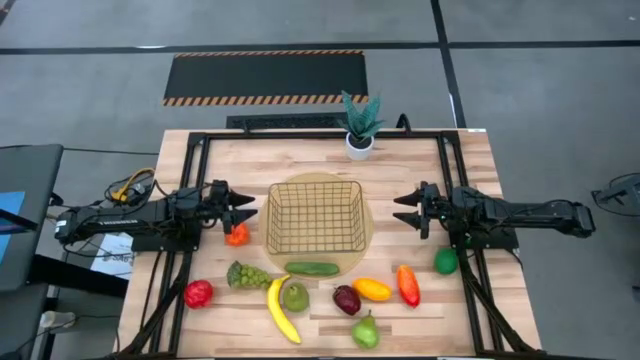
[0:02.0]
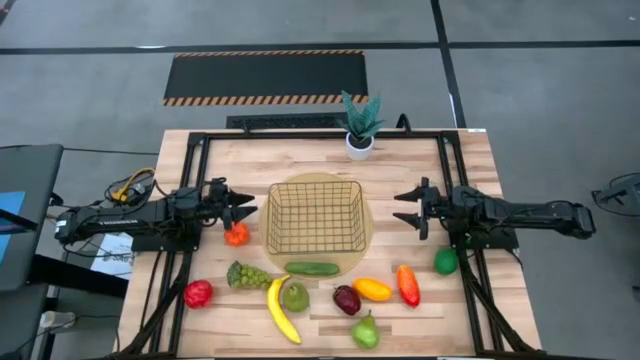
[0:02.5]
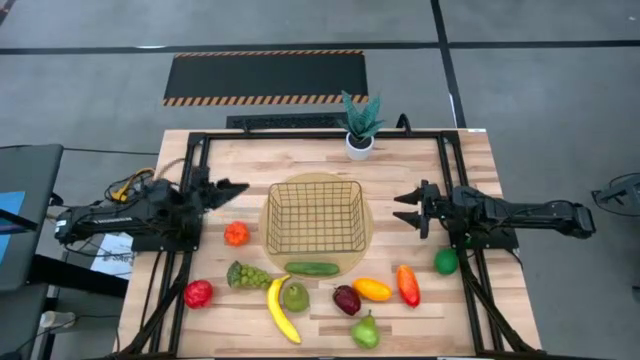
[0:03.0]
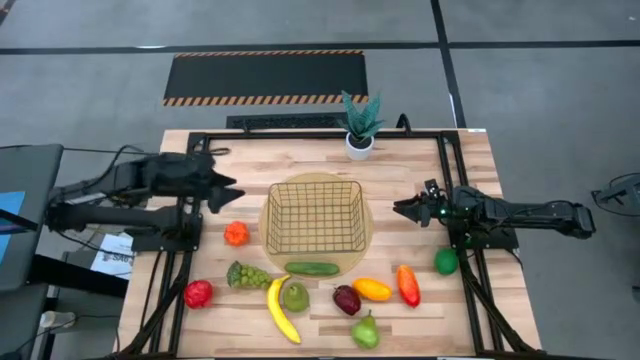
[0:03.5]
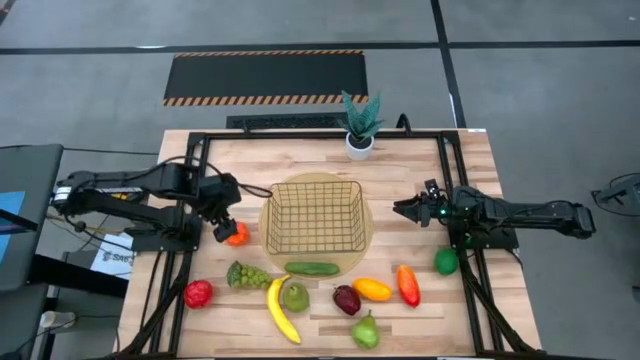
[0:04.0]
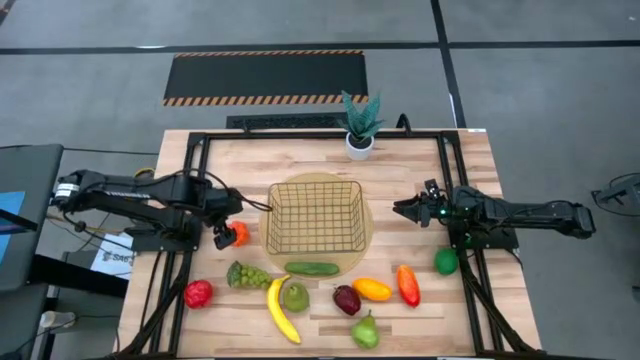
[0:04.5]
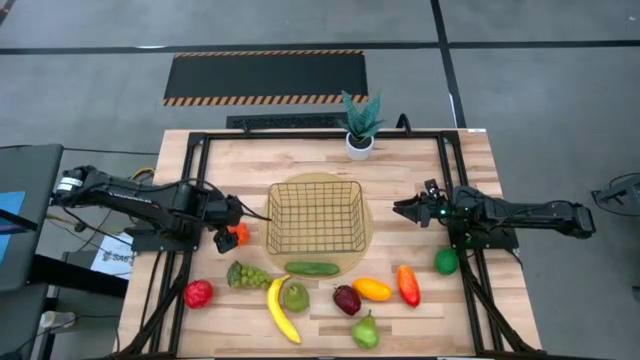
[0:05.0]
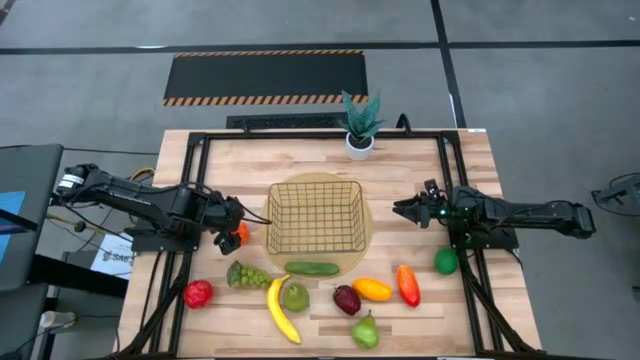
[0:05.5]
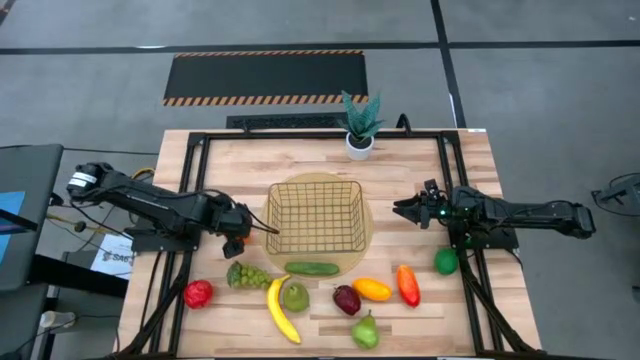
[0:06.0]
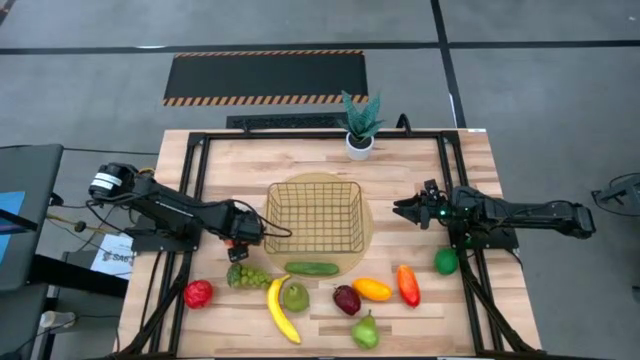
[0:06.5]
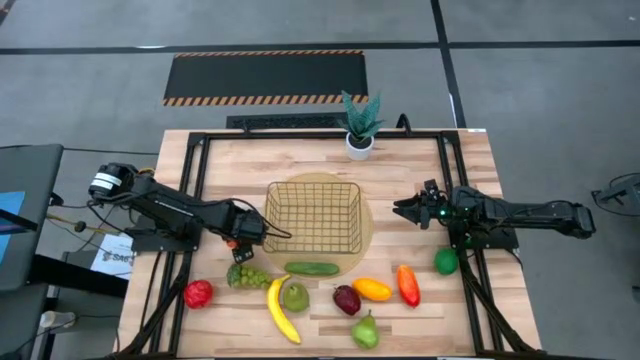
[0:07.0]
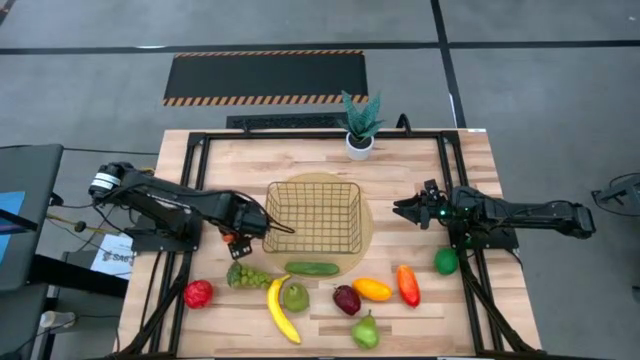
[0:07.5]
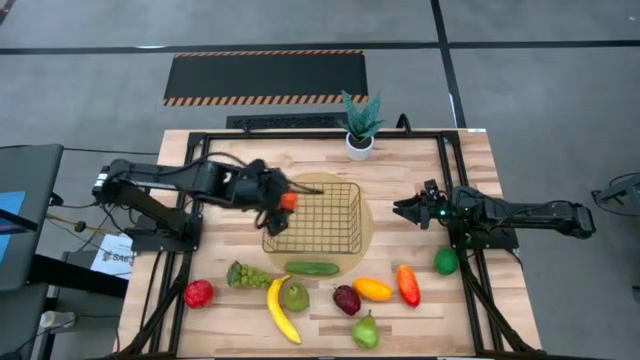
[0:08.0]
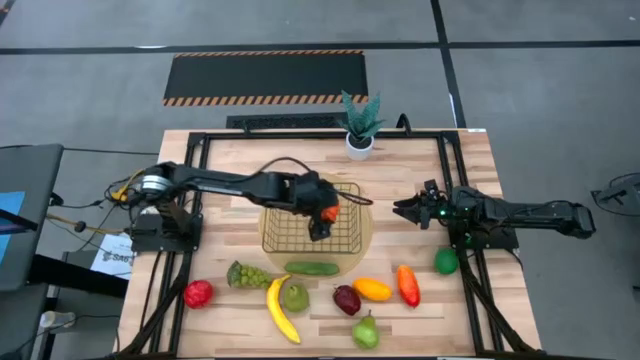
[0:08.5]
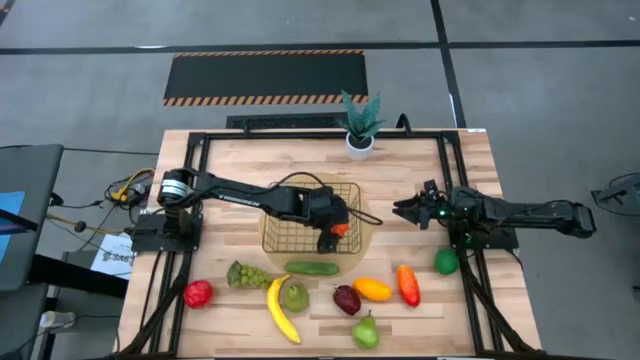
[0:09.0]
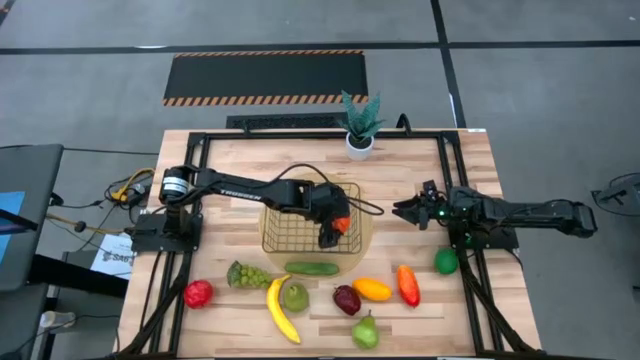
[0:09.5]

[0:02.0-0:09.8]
Task: Build produce basket
Put the pumpkin into the silver basket

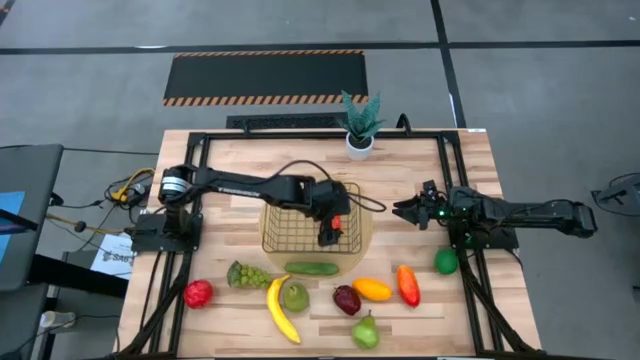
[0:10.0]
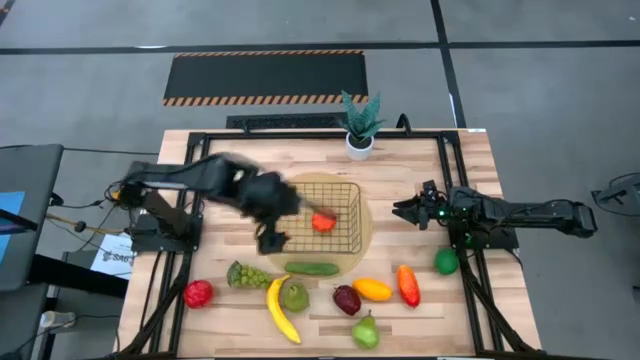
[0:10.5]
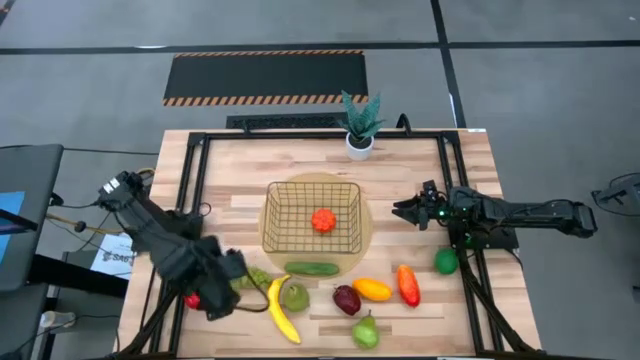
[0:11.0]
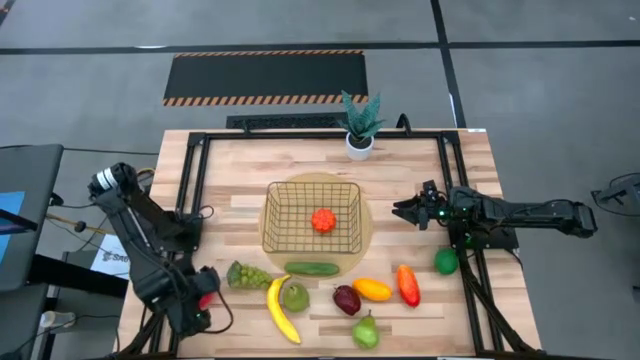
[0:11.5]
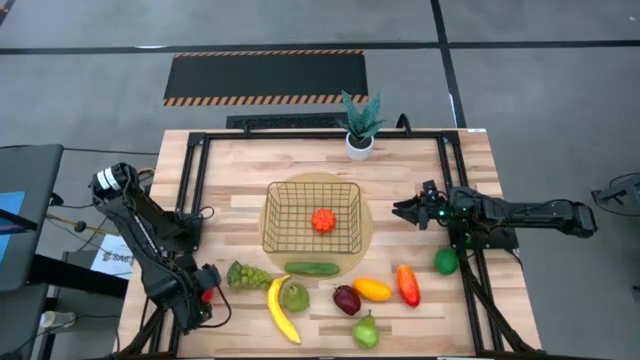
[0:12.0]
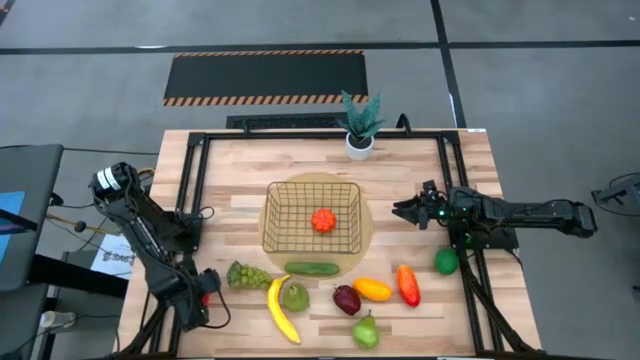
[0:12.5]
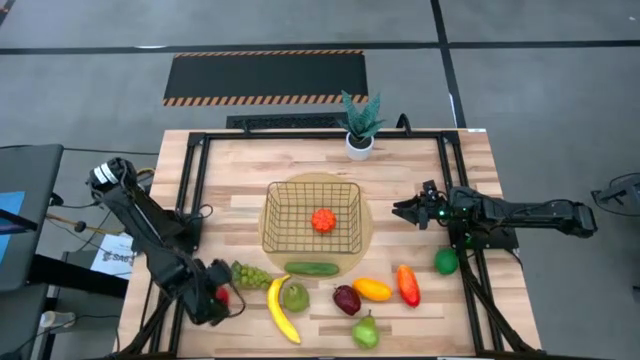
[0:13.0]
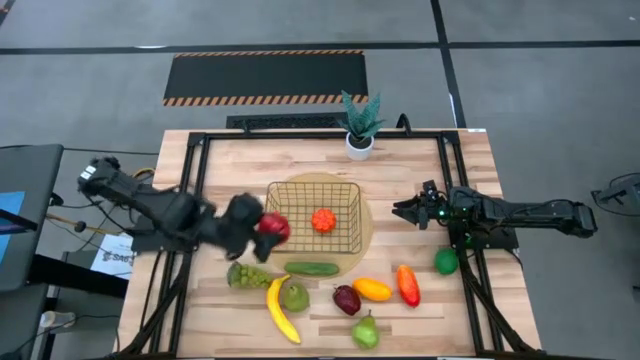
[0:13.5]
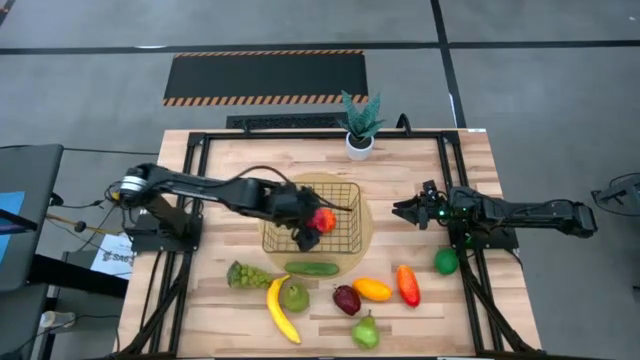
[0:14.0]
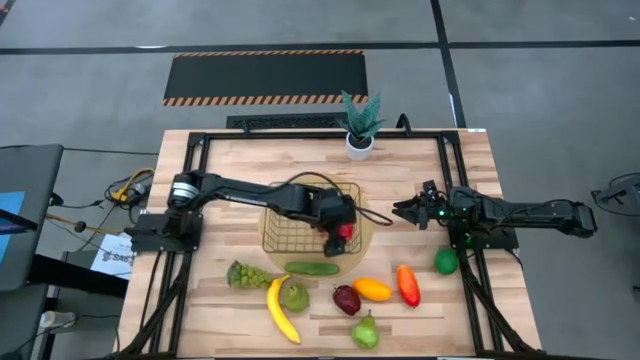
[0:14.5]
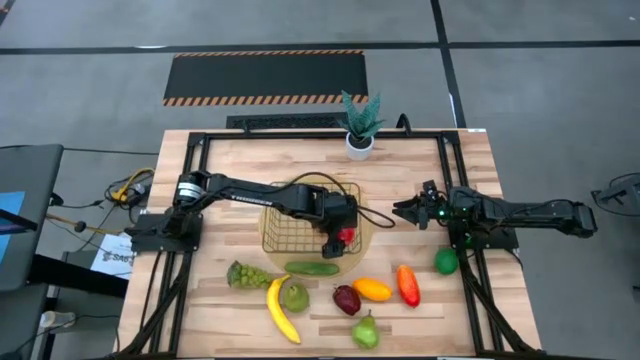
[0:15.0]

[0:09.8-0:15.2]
Put the apple into the silver basket

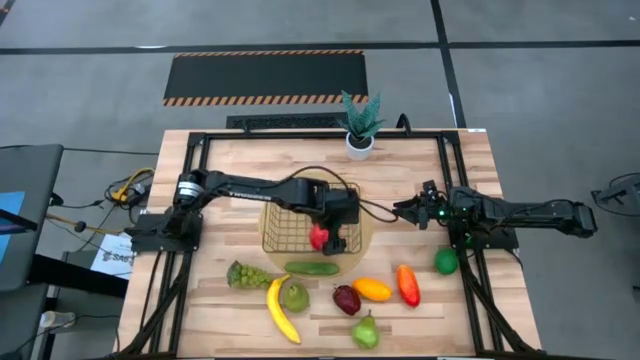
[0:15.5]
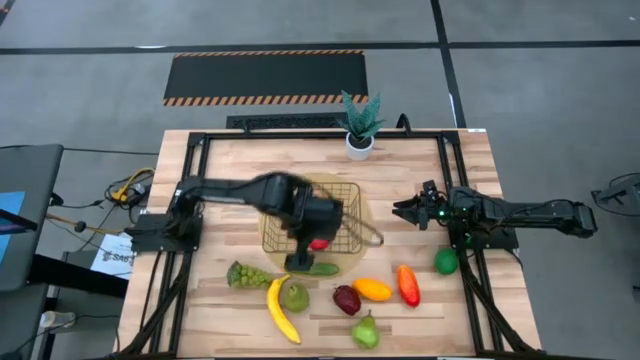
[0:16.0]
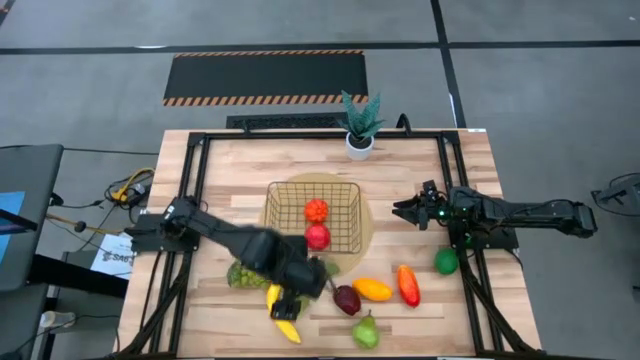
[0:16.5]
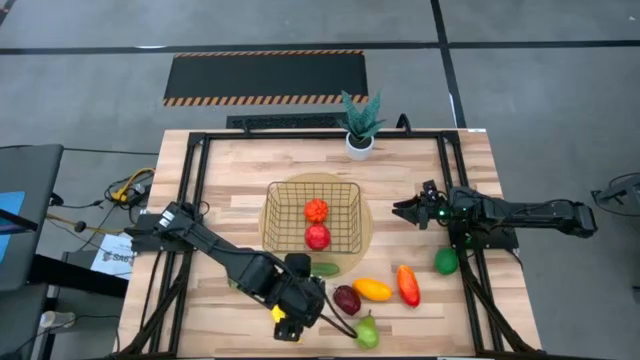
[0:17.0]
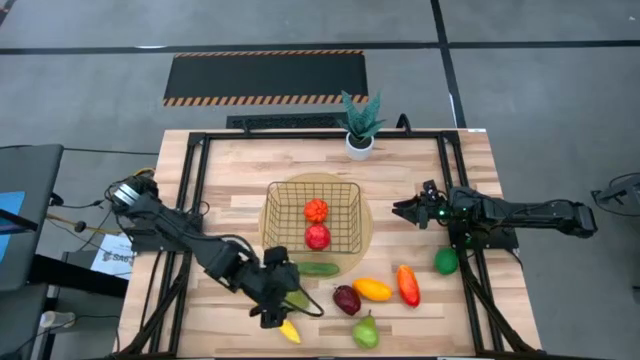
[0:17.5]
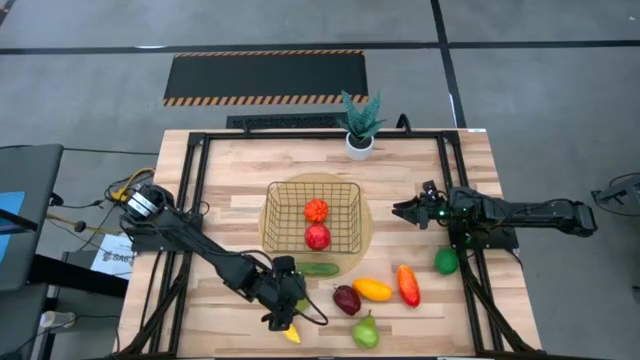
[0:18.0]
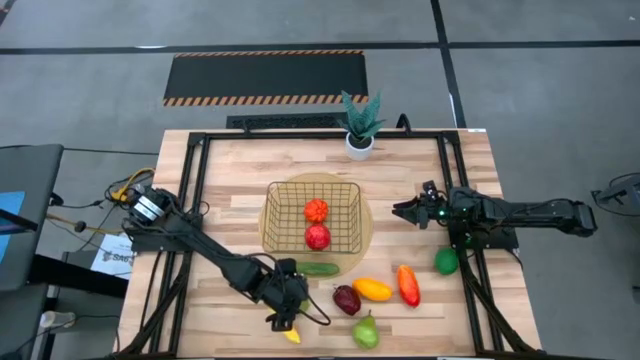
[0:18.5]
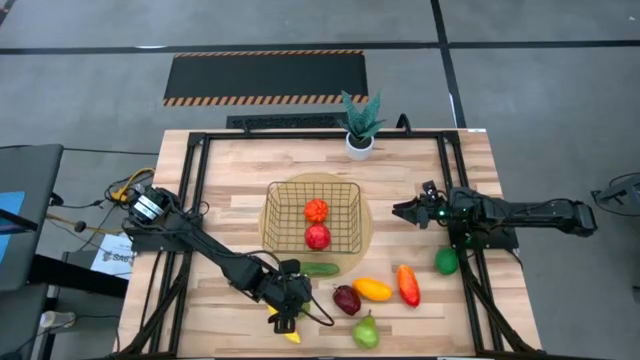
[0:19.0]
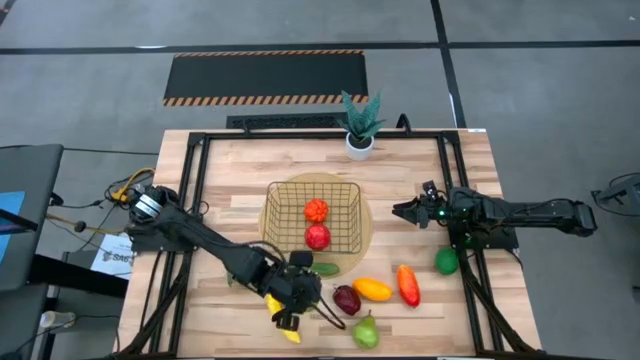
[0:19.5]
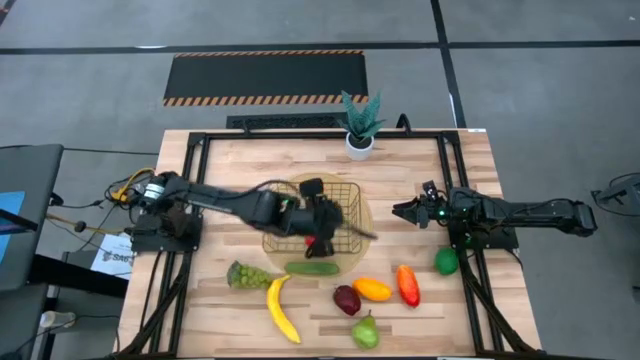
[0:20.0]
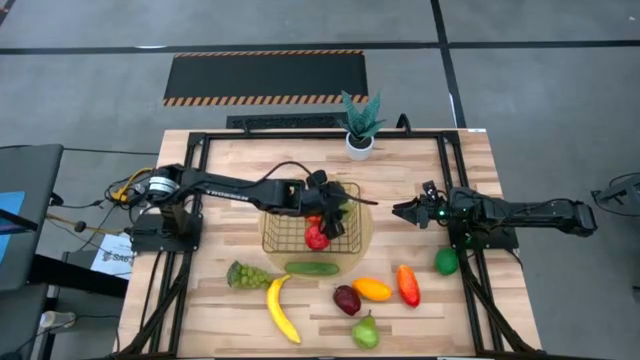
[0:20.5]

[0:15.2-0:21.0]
Put the left pear into the silver basket

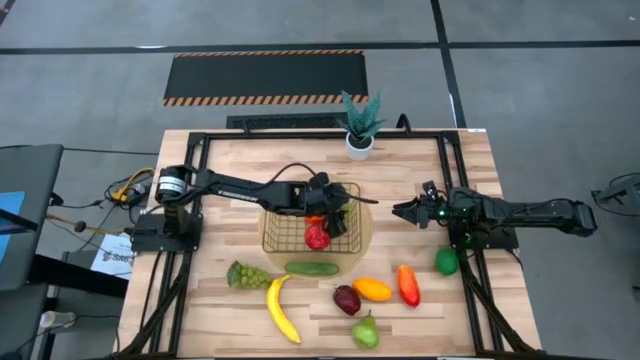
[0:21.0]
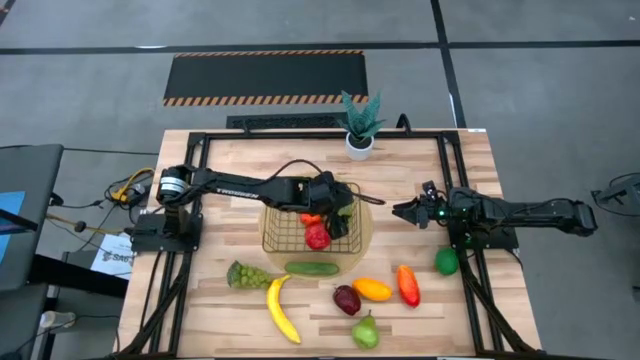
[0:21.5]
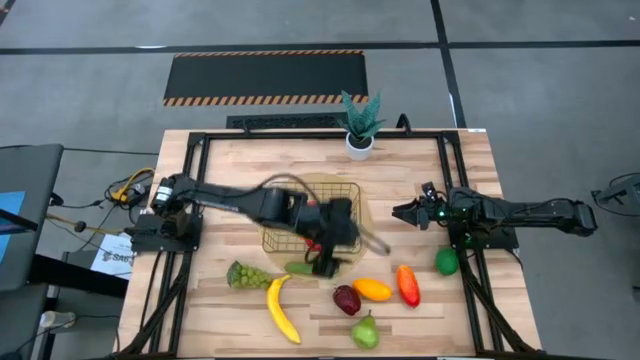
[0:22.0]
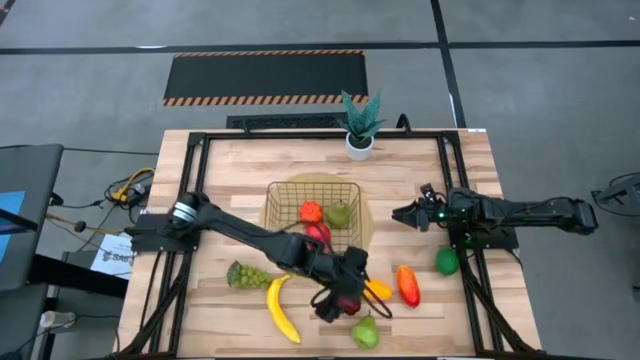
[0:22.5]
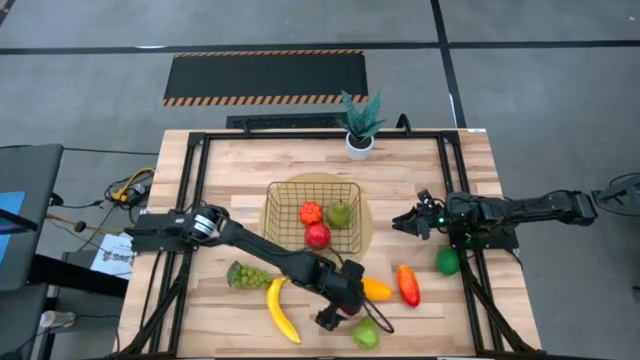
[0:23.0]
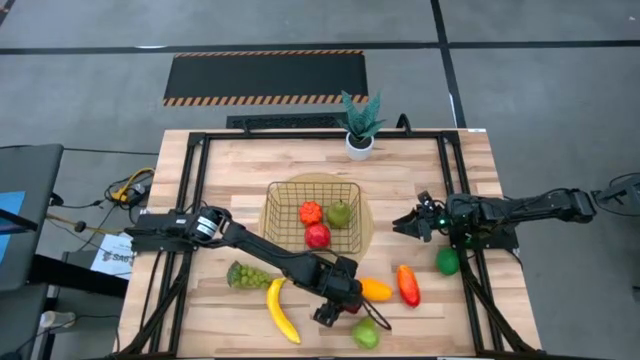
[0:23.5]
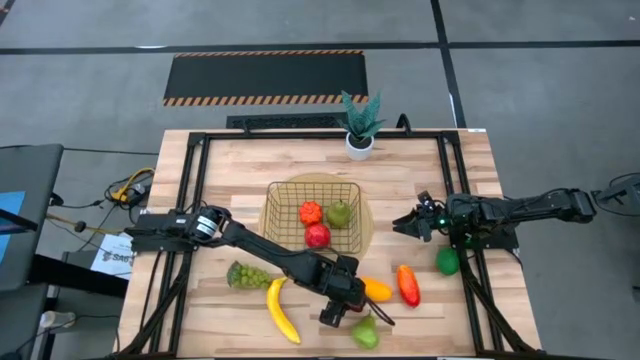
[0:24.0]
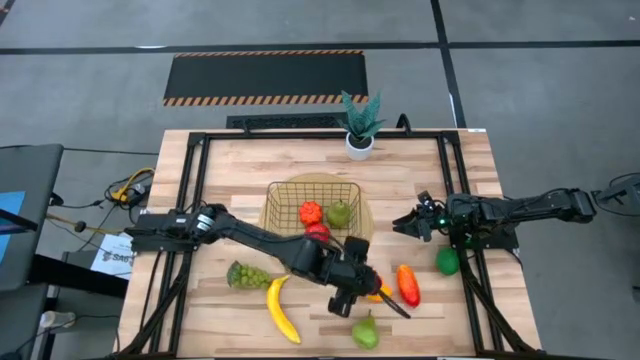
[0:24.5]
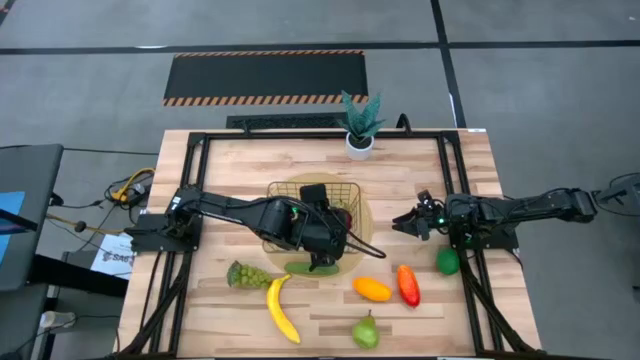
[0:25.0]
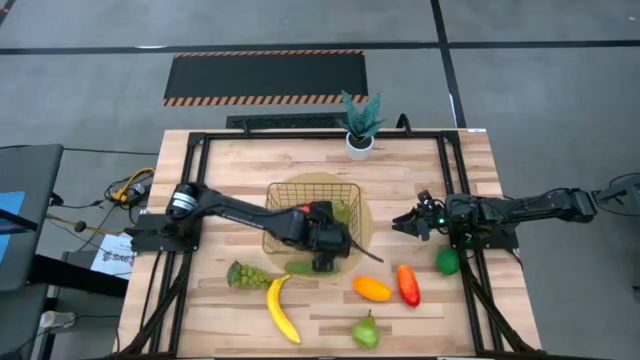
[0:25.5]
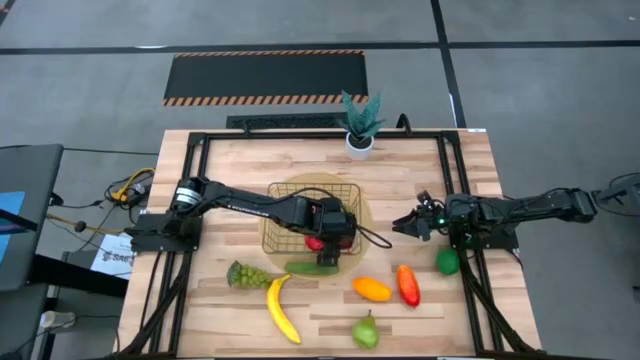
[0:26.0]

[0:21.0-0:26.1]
Put the jujube into the silver basket
